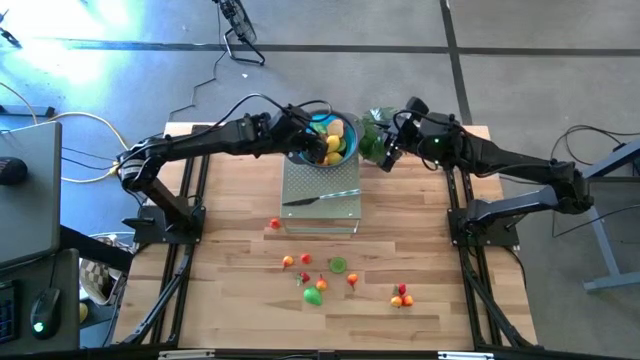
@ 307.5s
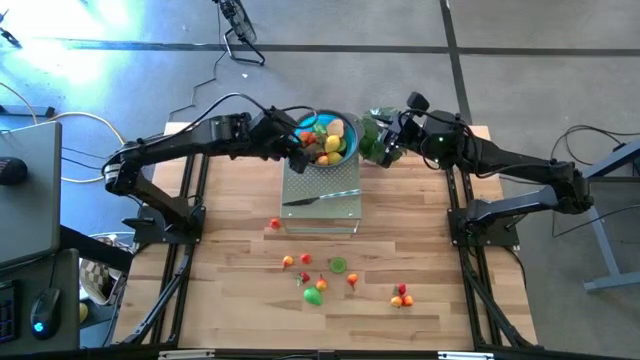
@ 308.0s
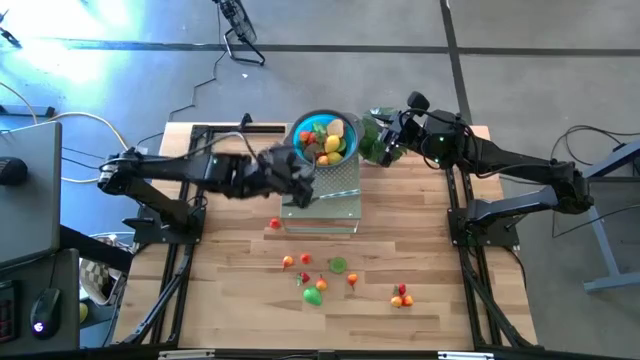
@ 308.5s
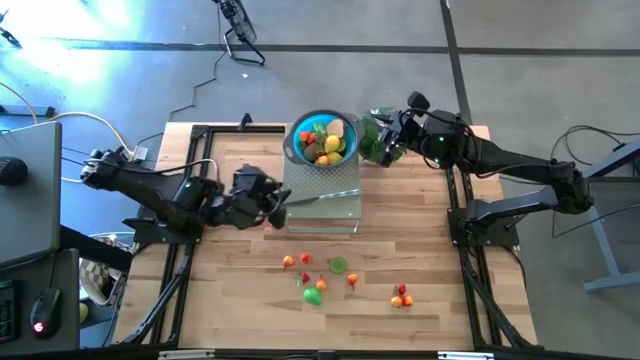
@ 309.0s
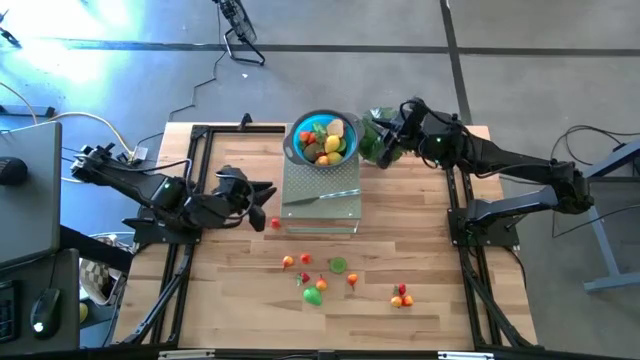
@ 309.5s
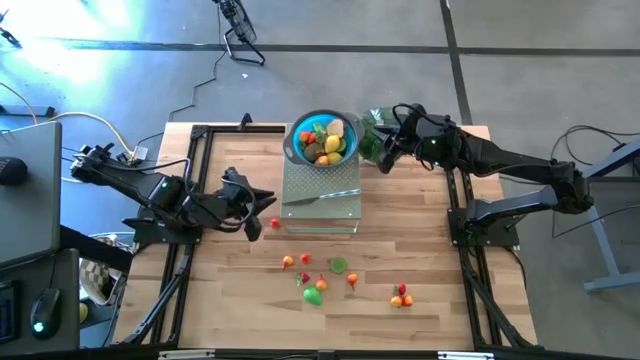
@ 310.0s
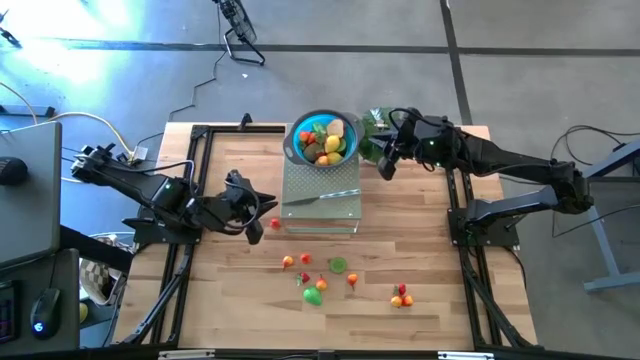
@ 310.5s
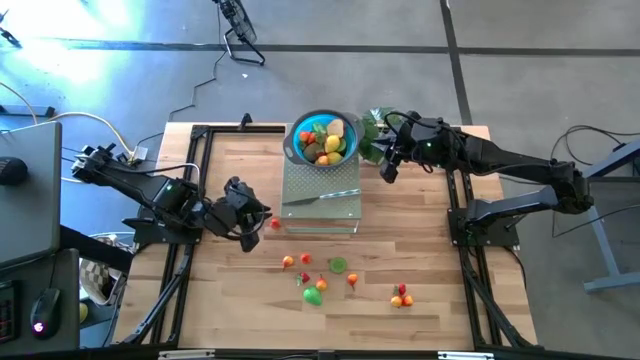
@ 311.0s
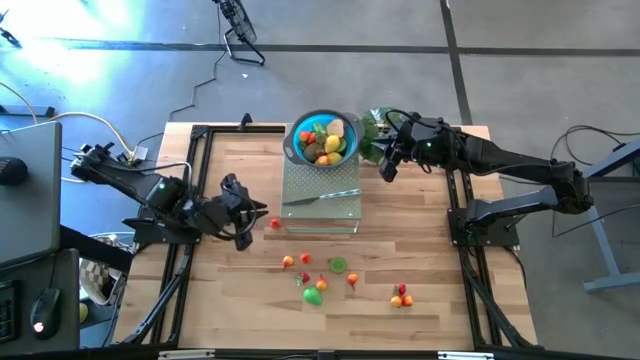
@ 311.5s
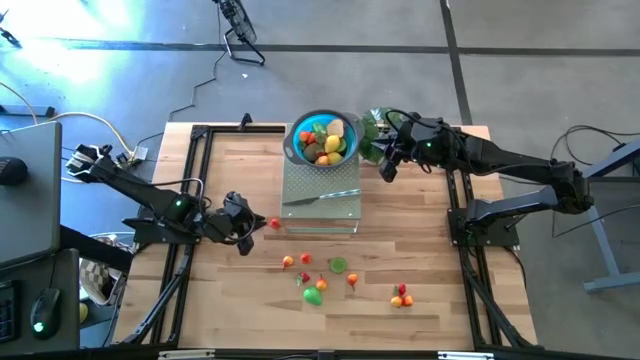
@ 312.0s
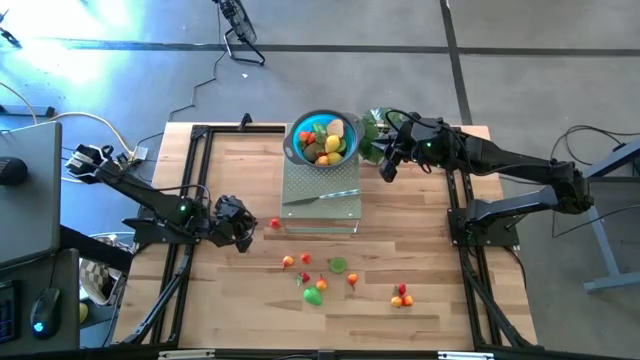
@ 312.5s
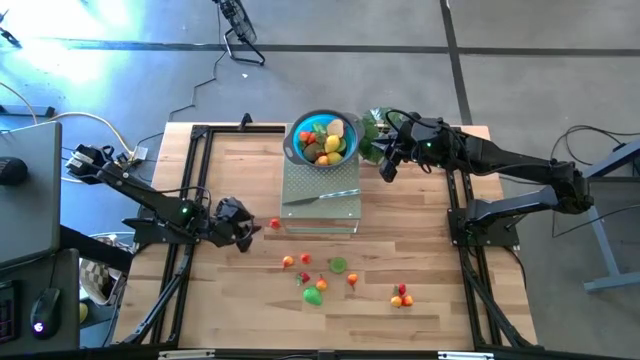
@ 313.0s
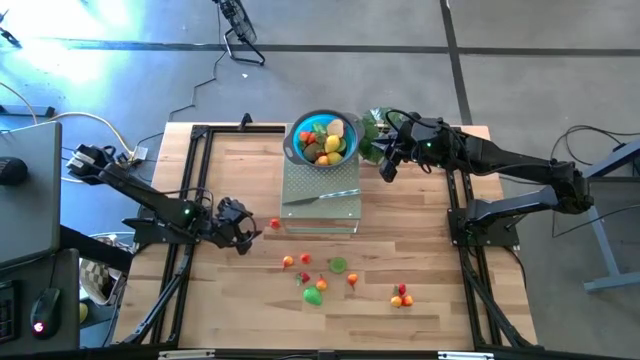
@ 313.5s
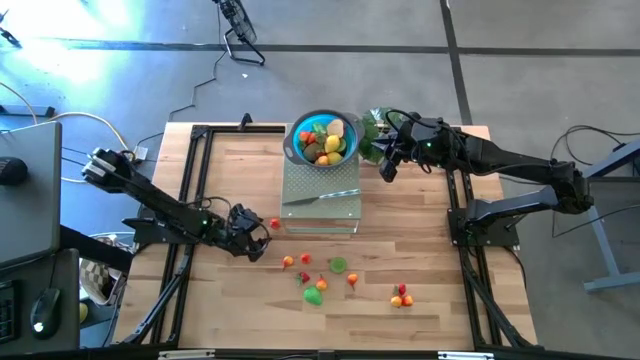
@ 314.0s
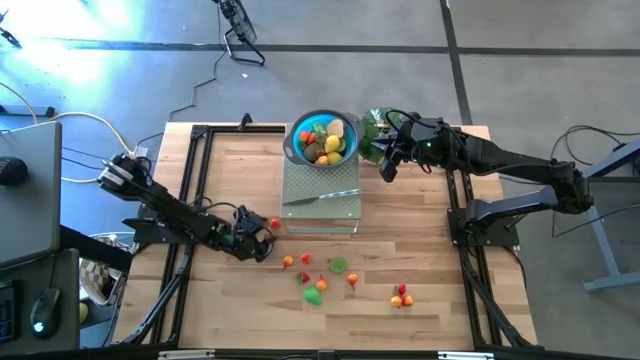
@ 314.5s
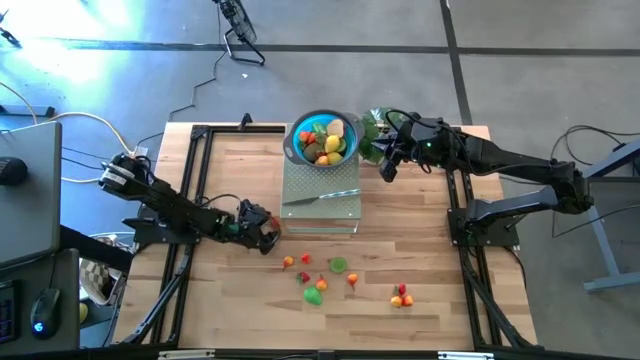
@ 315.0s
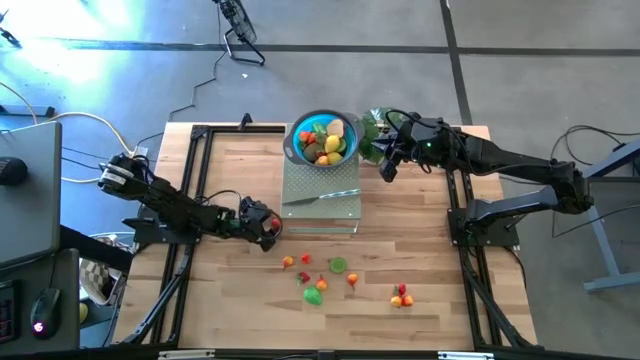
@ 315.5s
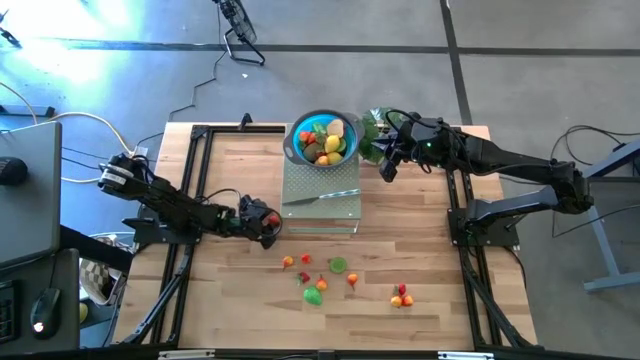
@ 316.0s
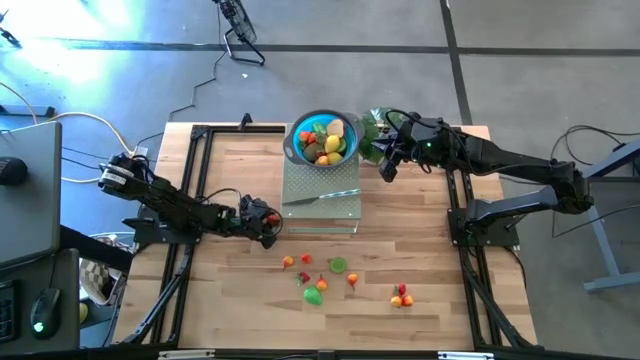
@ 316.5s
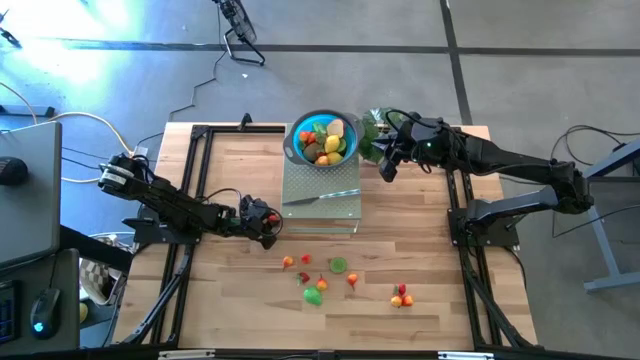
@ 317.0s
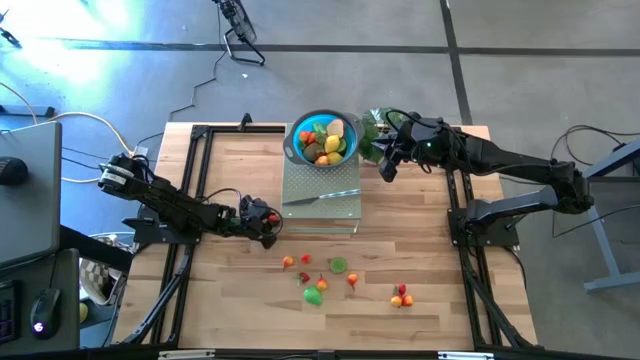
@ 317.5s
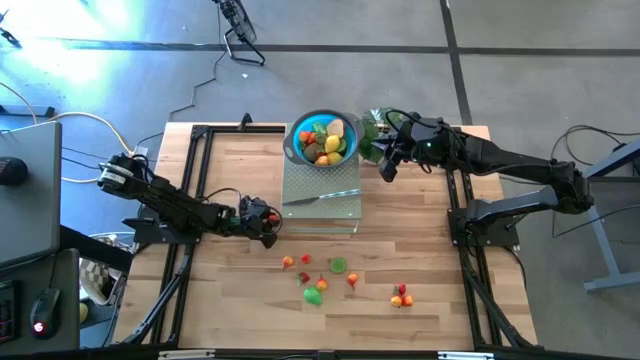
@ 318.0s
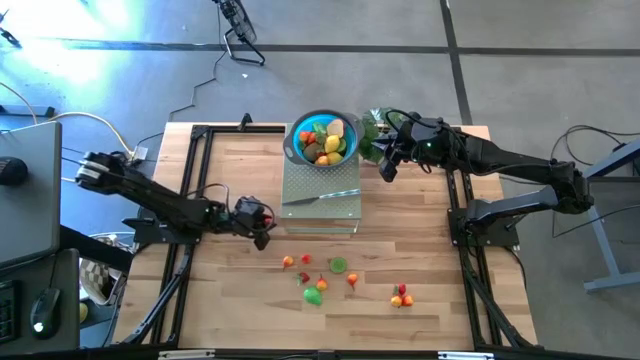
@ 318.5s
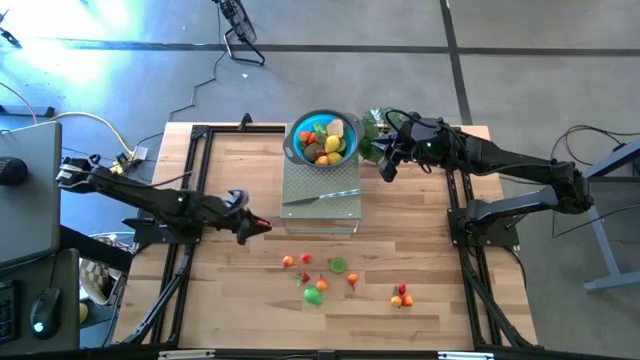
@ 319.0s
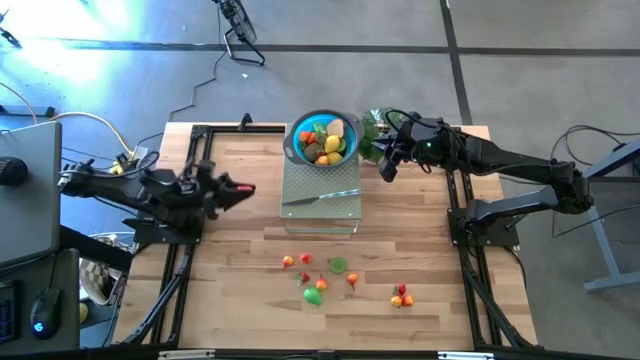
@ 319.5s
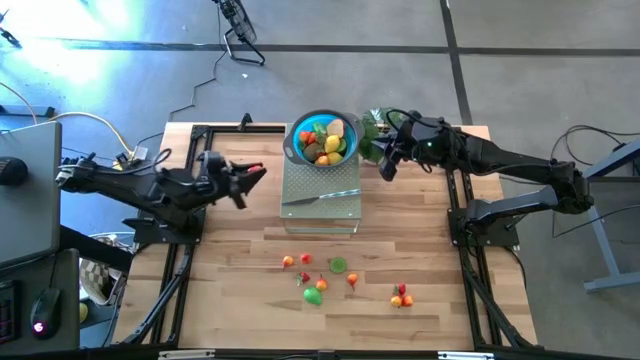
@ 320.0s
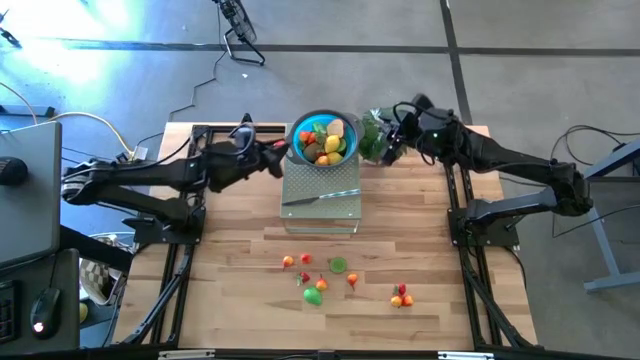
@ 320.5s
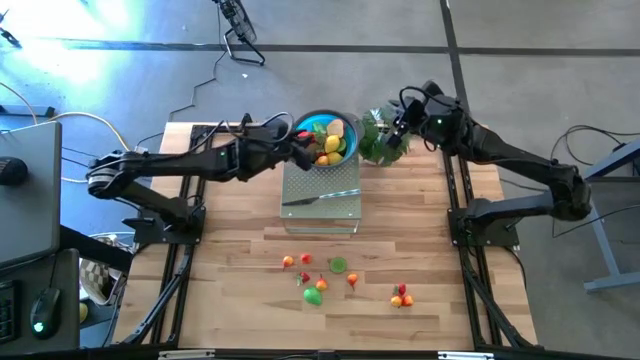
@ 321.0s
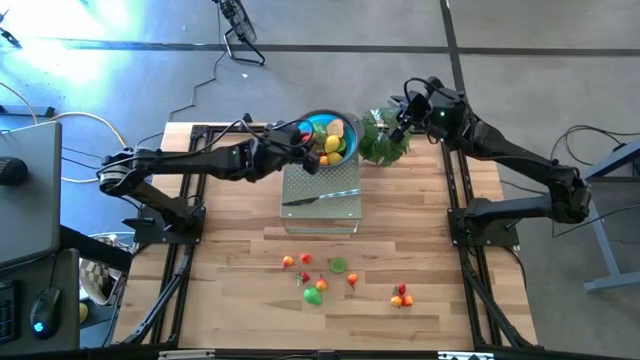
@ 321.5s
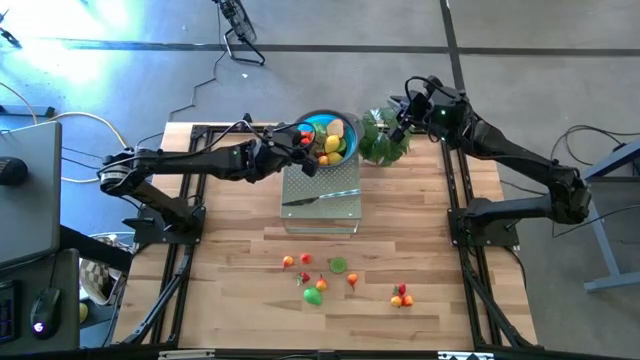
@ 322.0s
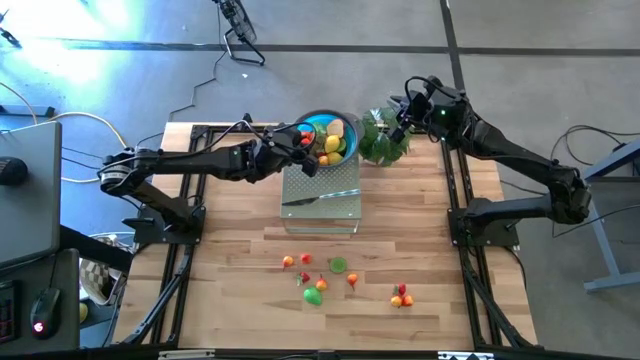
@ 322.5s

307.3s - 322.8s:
Task: Pick & Place Fruit
Put the orange peach in the blue bowl on the shelf

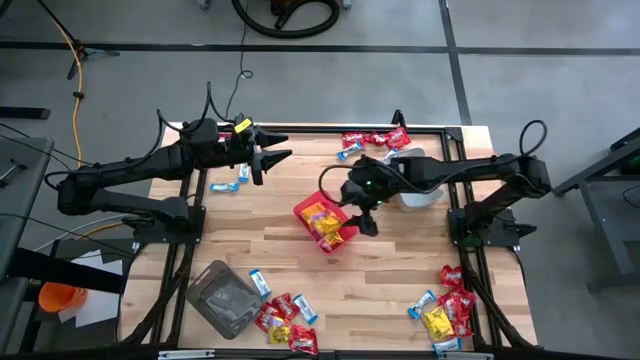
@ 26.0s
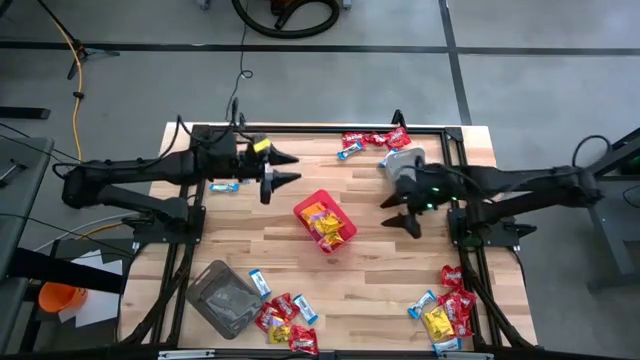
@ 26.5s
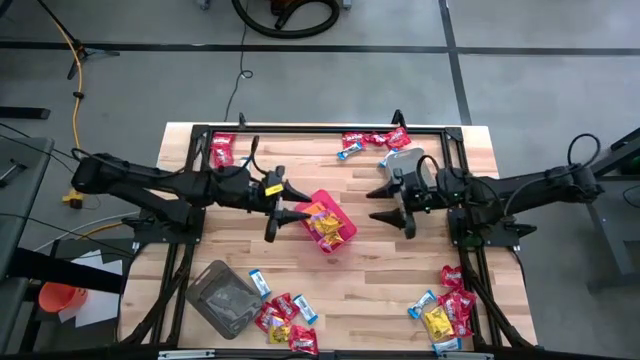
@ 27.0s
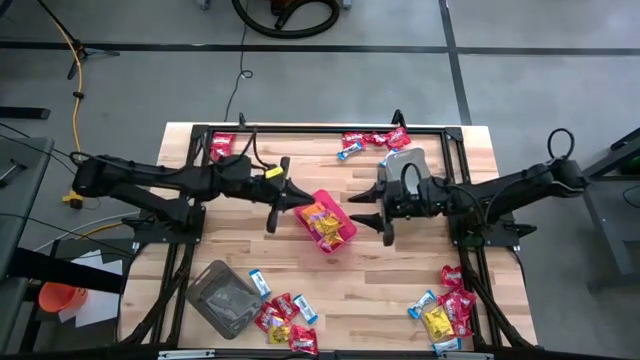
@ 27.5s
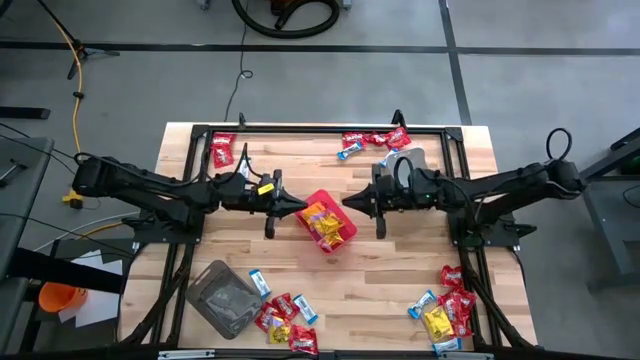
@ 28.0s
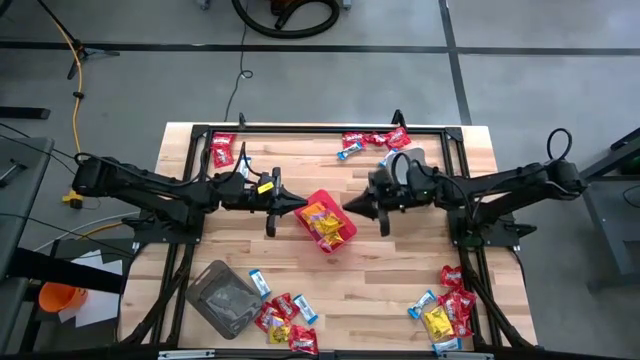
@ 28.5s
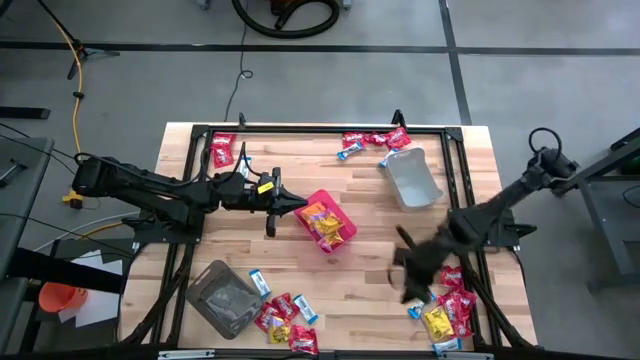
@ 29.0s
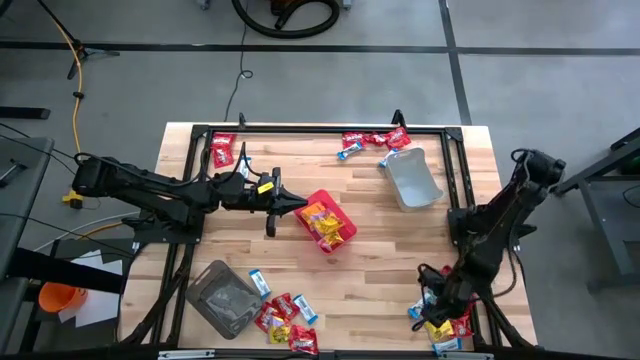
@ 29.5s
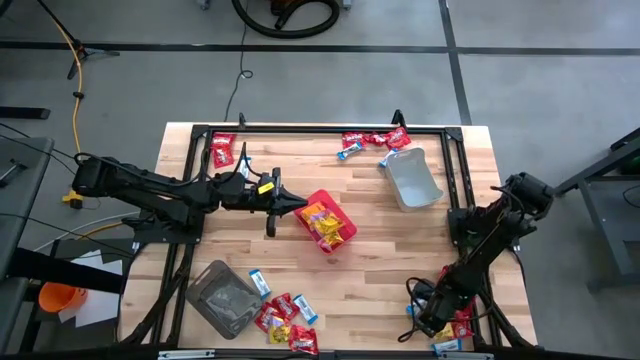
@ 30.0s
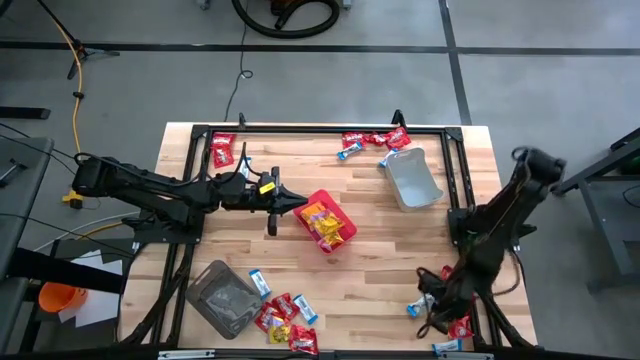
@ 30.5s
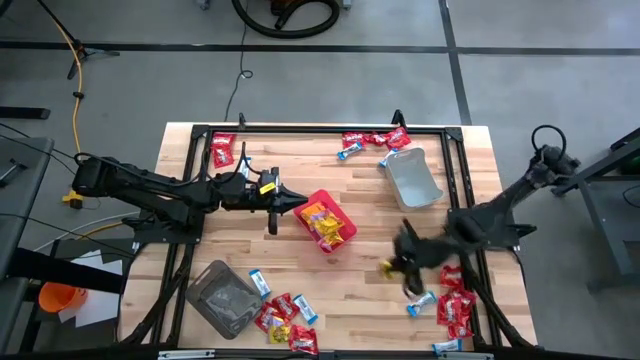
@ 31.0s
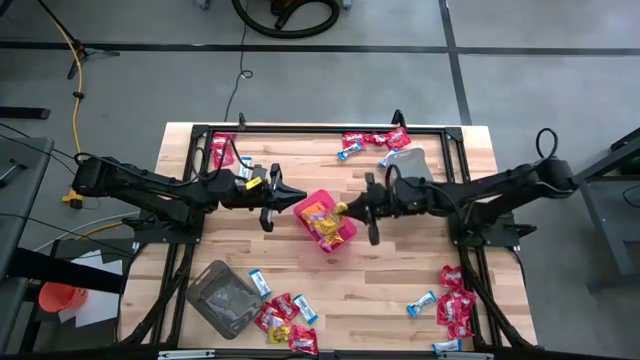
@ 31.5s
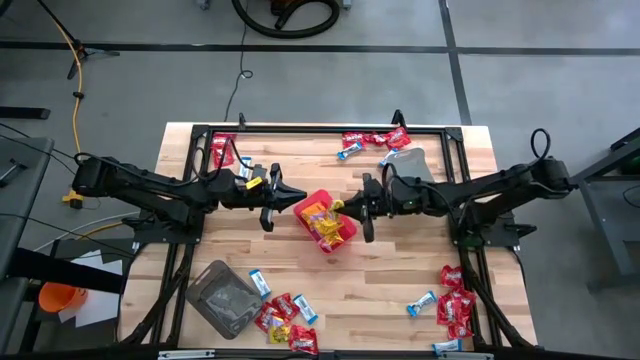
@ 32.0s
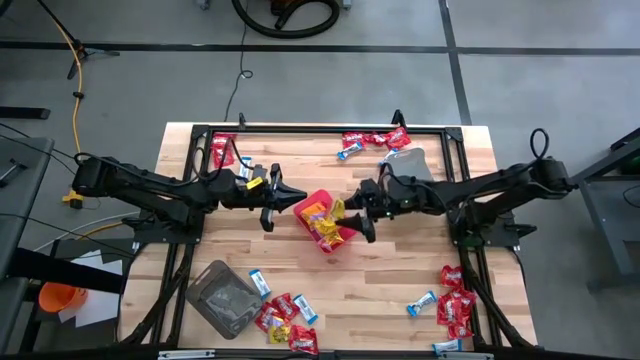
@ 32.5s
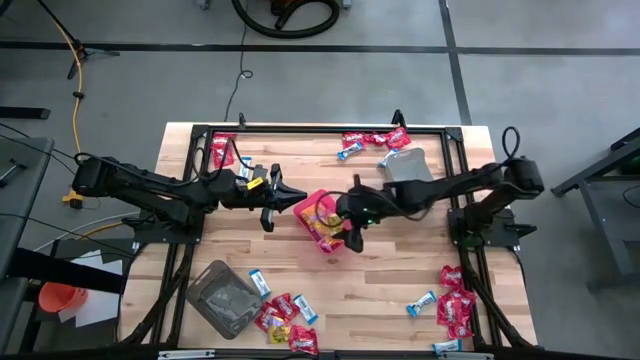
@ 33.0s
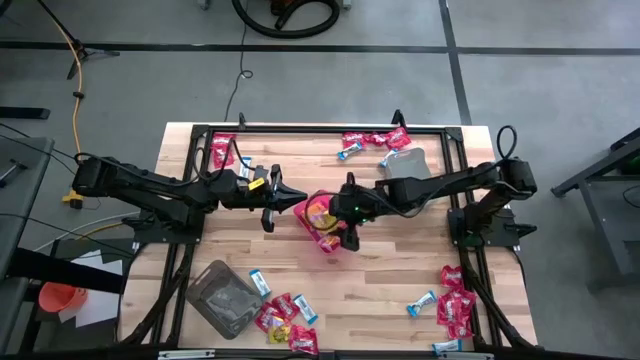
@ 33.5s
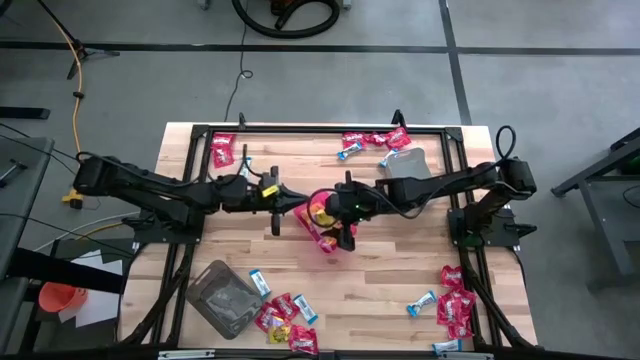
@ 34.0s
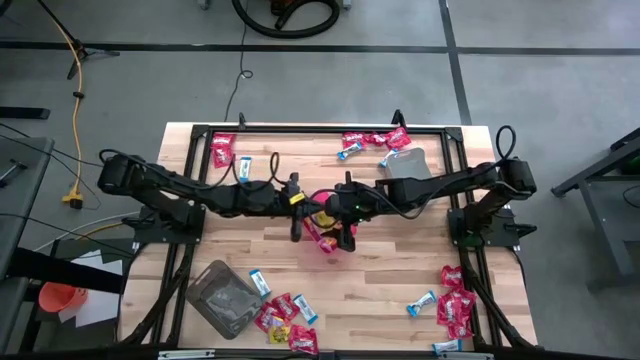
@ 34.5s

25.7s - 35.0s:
Task: Sort candy
Put the yellow candy into the red bin
